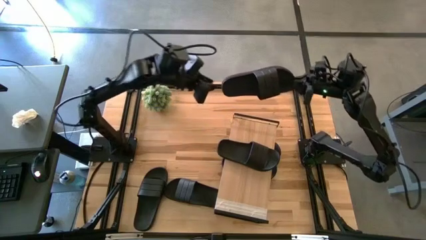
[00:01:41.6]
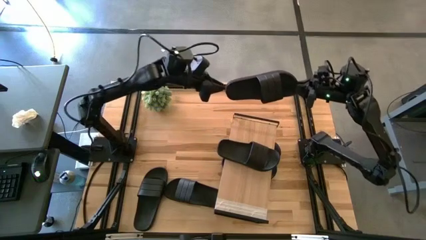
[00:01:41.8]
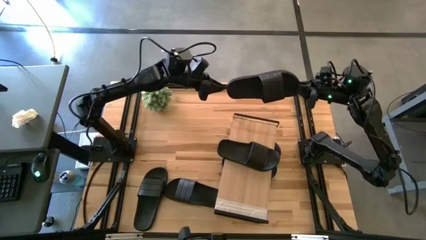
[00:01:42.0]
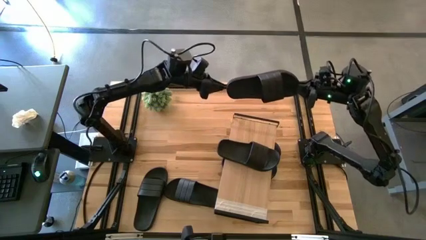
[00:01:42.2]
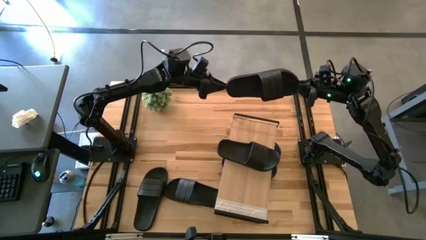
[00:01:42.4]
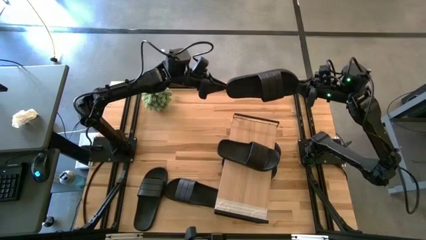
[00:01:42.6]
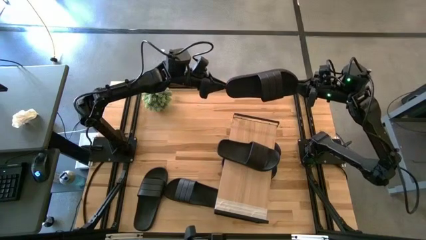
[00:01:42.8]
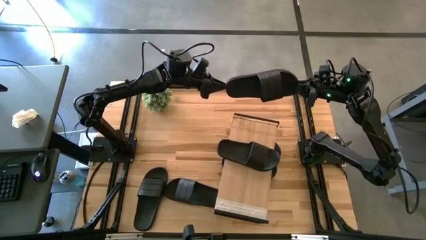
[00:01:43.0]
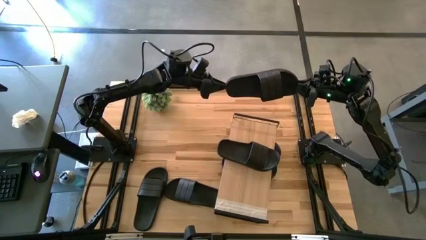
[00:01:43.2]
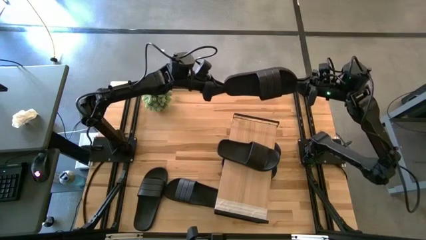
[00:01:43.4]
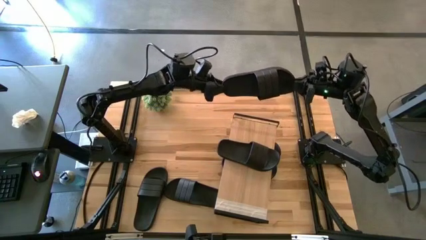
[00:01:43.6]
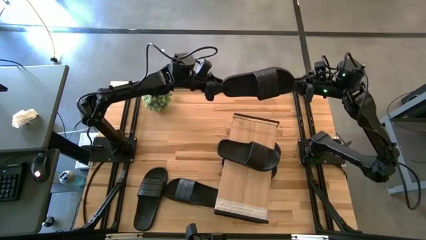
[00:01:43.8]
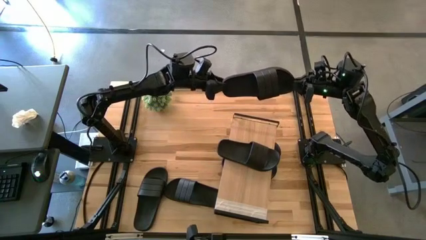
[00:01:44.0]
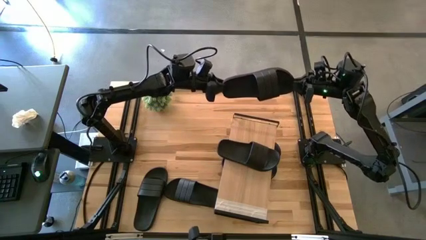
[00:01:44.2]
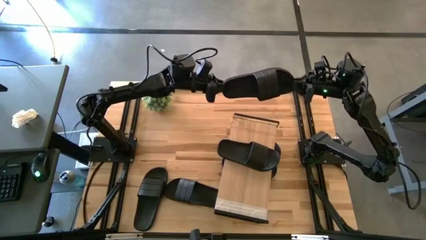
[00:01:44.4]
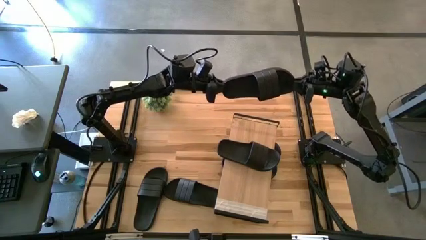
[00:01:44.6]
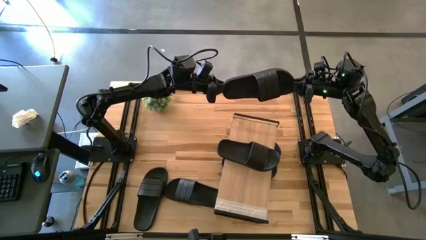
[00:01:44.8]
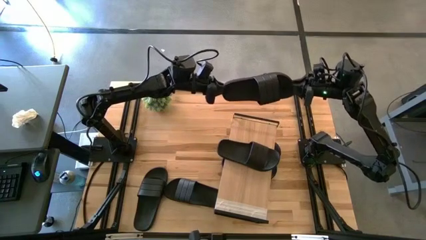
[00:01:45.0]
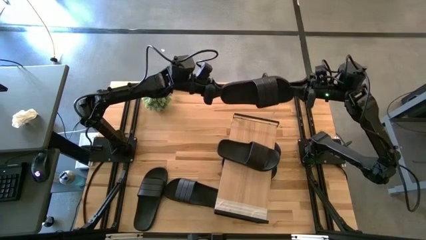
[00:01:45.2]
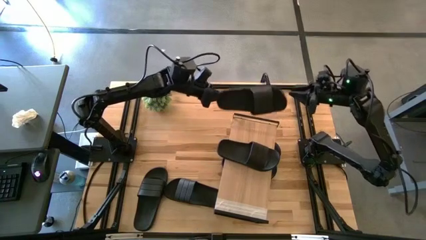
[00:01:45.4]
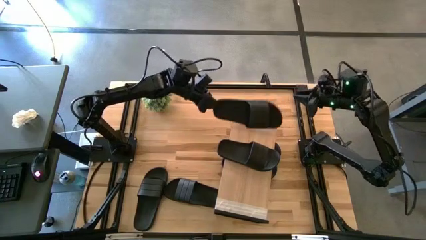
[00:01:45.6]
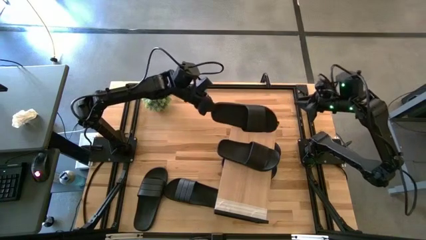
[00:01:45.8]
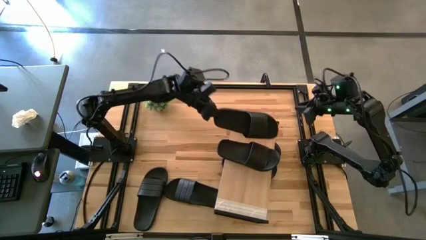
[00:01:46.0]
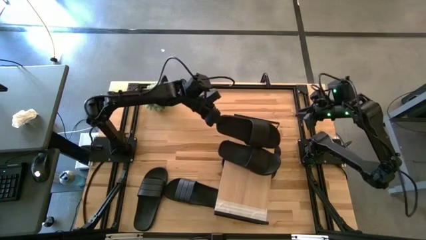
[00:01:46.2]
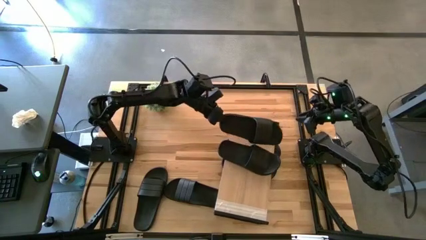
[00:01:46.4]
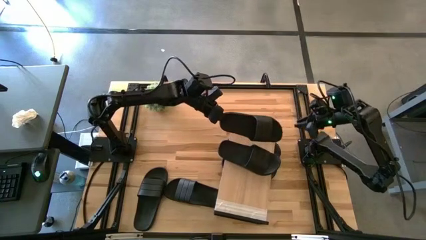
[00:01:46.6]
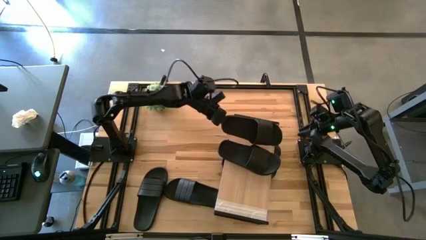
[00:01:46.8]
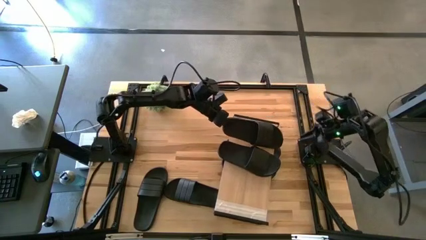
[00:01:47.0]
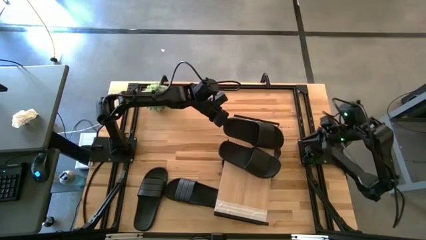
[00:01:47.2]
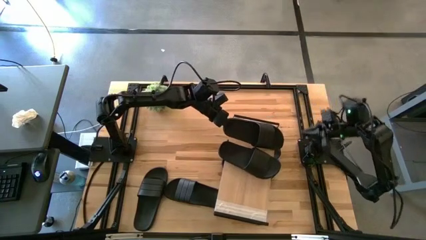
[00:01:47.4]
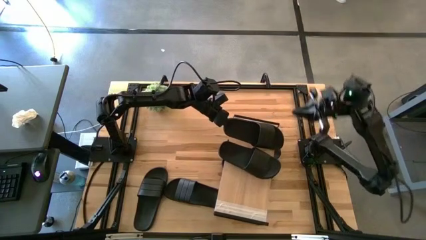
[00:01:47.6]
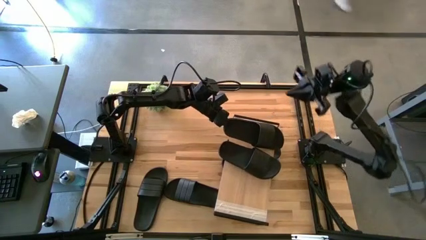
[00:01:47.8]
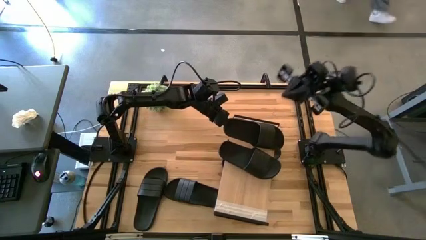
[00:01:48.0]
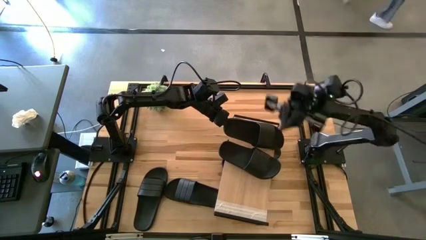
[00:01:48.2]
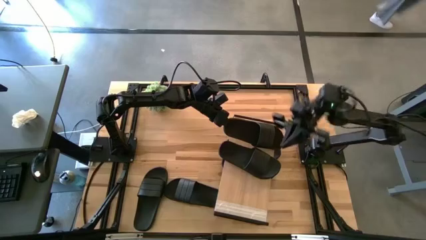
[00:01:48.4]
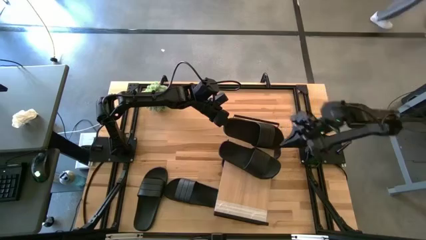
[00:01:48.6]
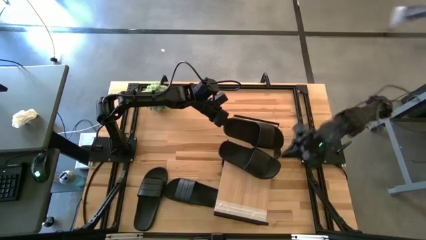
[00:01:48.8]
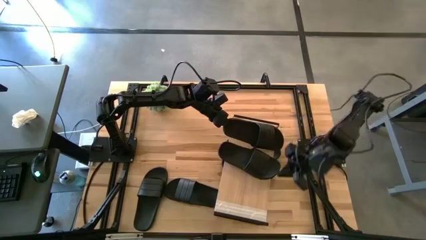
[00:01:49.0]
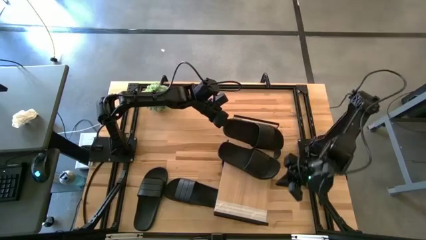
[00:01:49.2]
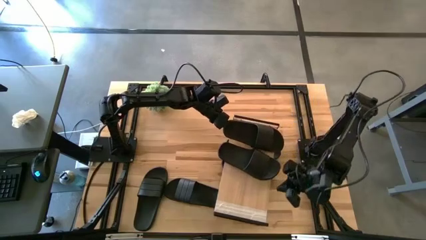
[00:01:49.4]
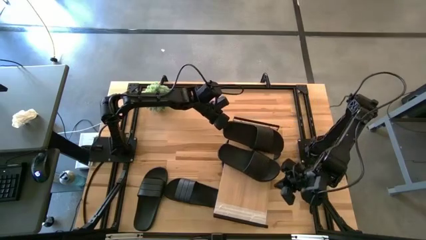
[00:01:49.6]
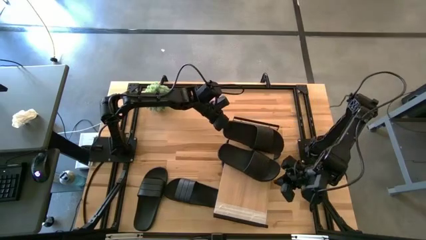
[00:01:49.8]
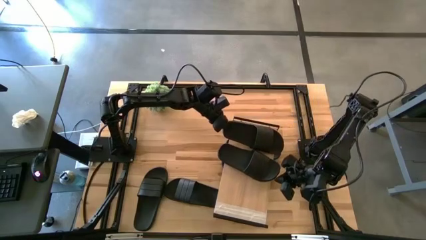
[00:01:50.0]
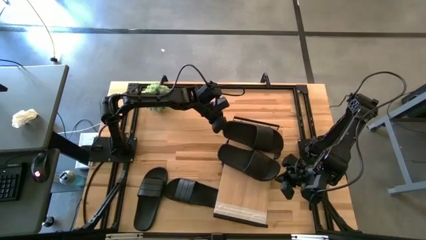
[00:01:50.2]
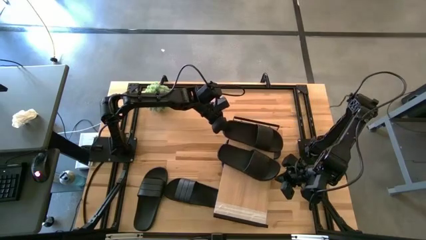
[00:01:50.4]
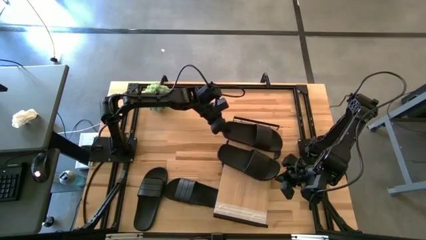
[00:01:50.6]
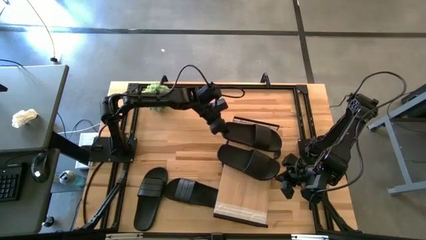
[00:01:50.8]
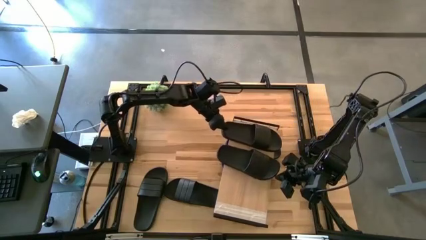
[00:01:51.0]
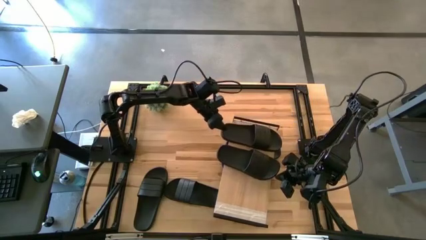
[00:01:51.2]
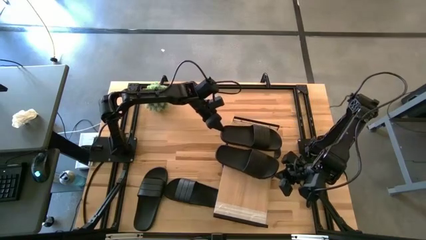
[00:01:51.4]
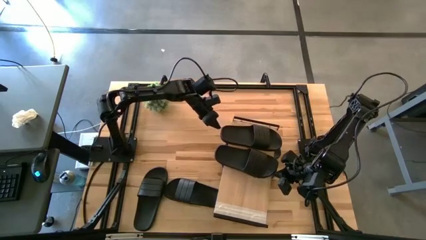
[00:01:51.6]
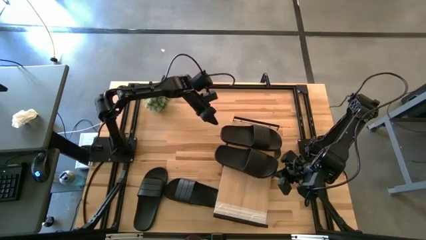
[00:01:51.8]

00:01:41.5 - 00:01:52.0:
Task: Pick and place slides into the shelf
Put the top black slide on the shelf

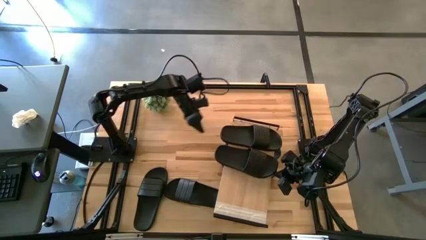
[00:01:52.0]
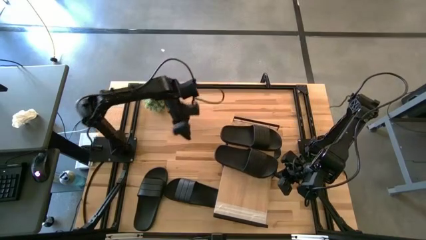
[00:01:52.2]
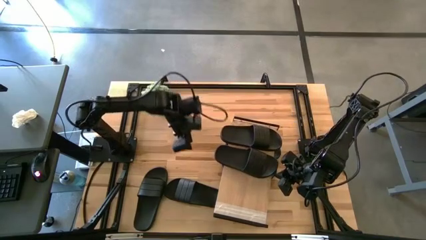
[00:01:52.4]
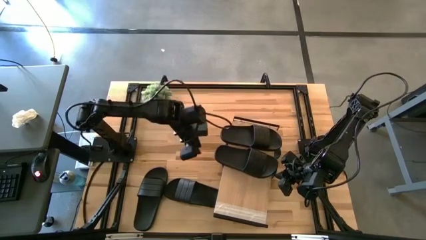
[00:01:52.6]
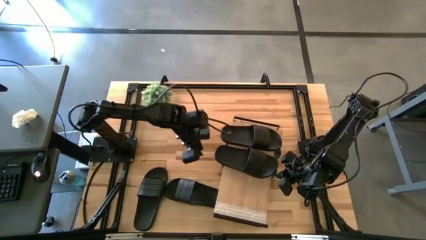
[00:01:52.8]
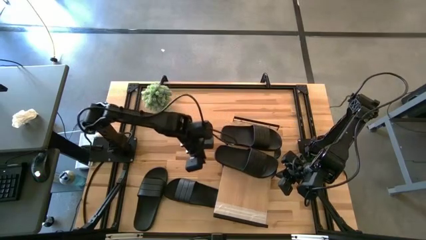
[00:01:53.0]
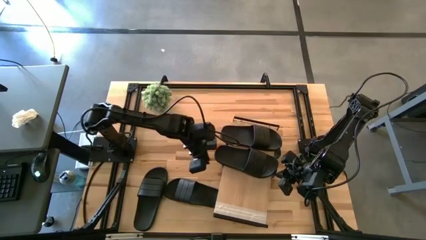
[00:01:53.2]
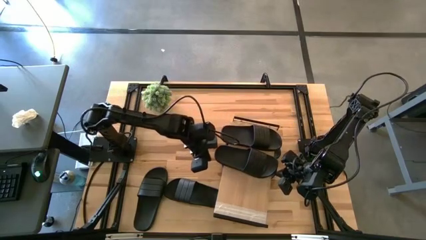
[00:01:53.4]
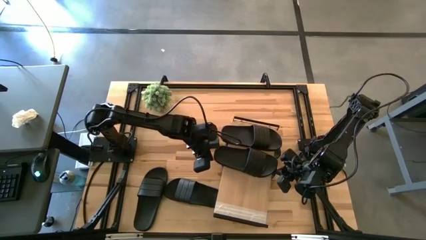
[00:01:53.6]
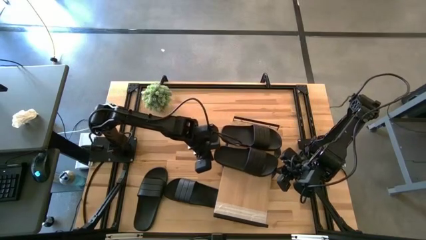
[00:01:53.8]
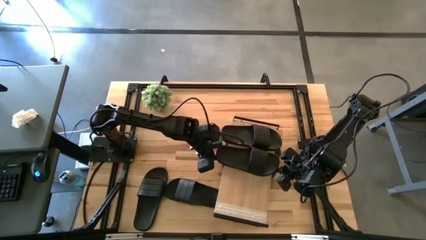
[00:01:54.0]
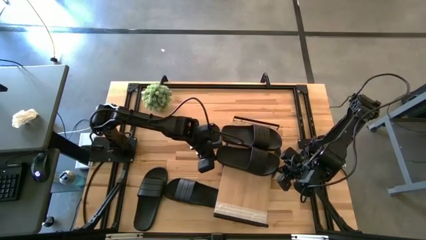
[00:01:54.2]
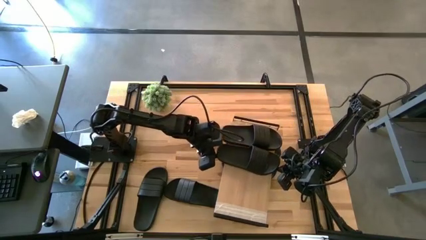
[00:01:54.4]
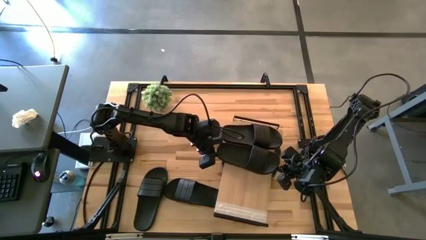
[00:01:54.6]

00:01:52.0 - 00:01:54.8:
Adjust the black slide on the shelf

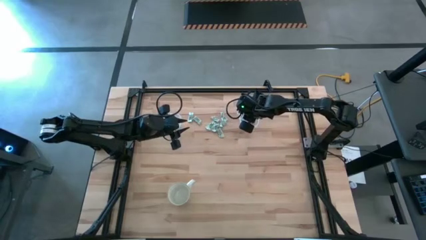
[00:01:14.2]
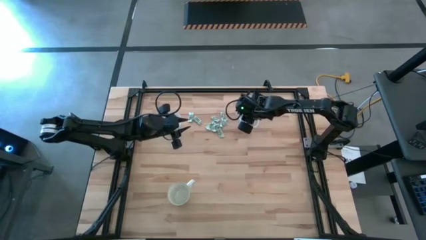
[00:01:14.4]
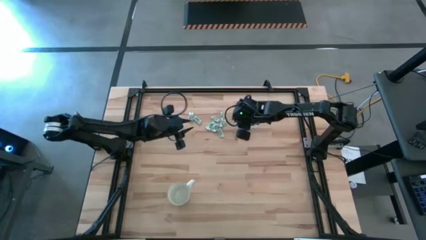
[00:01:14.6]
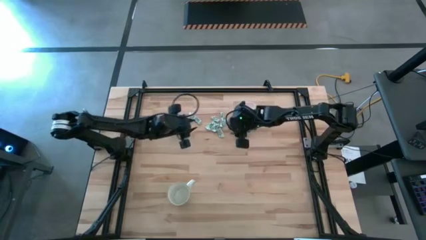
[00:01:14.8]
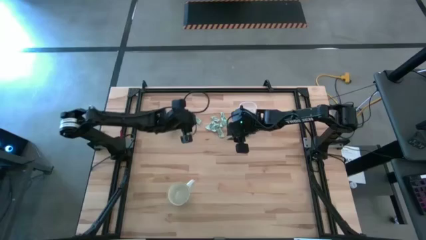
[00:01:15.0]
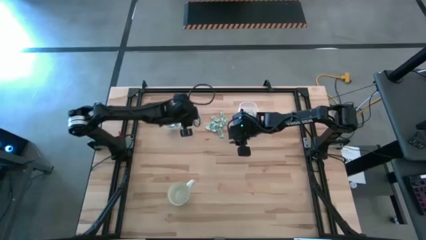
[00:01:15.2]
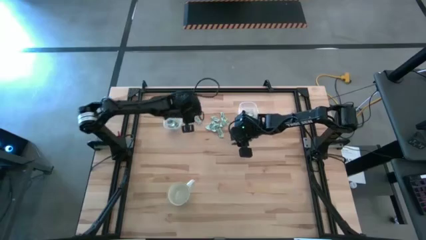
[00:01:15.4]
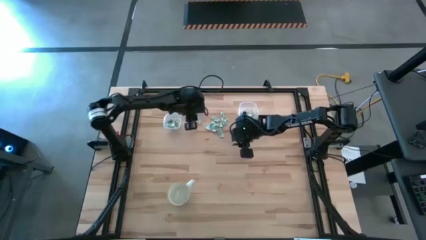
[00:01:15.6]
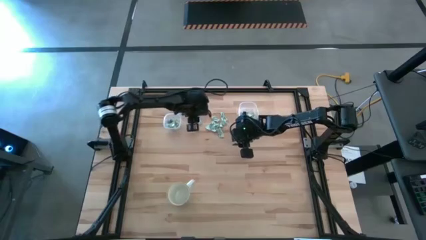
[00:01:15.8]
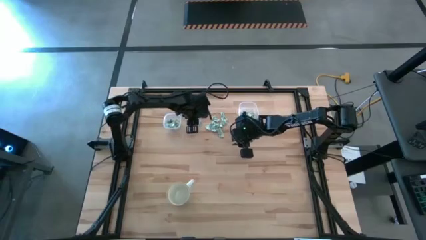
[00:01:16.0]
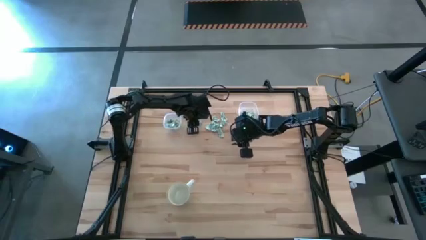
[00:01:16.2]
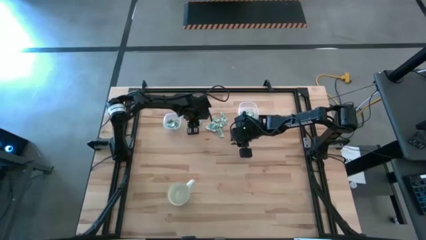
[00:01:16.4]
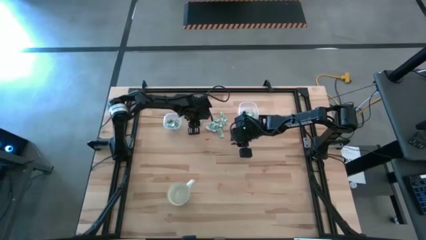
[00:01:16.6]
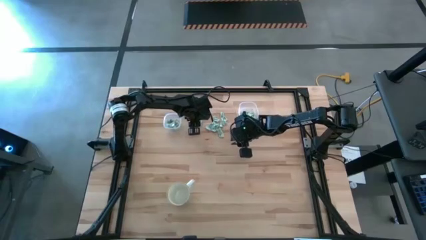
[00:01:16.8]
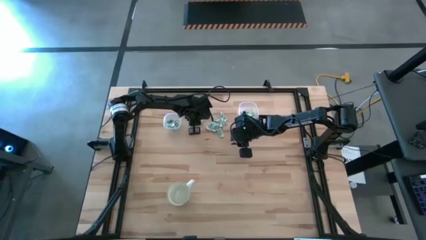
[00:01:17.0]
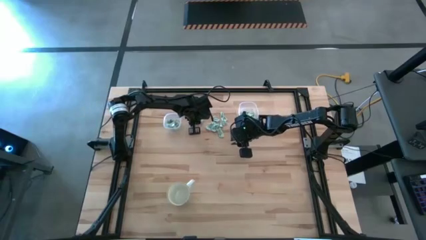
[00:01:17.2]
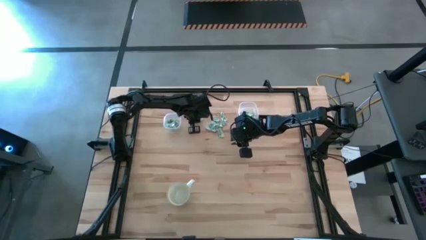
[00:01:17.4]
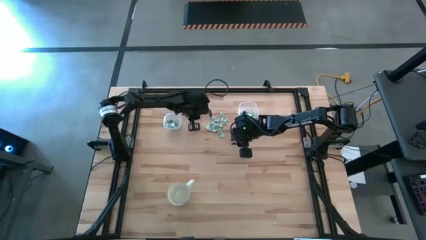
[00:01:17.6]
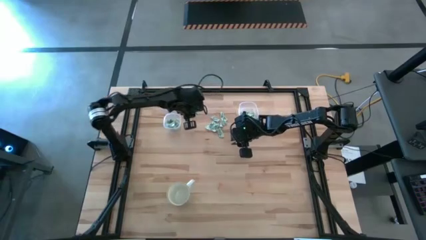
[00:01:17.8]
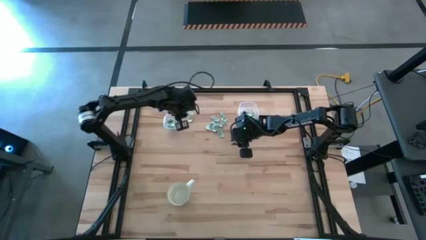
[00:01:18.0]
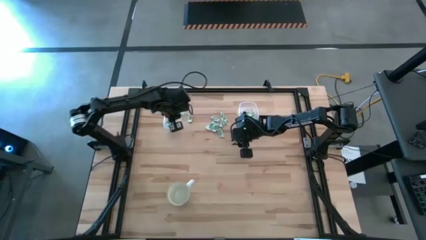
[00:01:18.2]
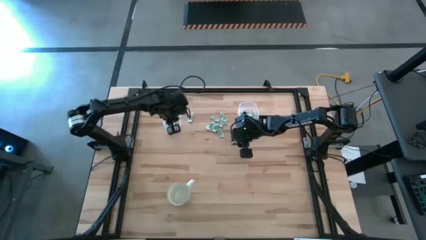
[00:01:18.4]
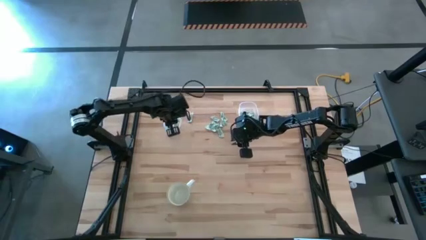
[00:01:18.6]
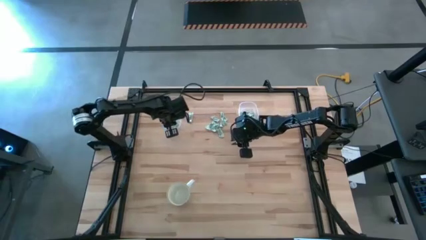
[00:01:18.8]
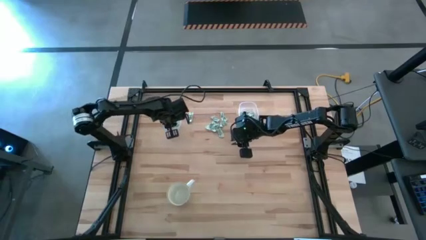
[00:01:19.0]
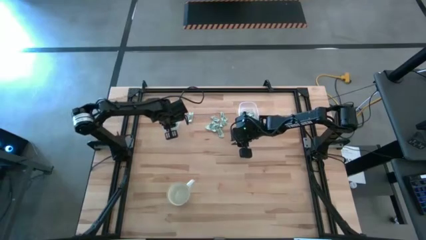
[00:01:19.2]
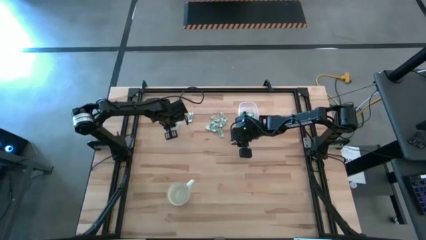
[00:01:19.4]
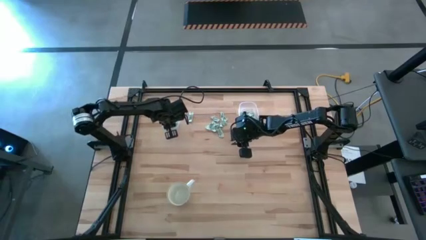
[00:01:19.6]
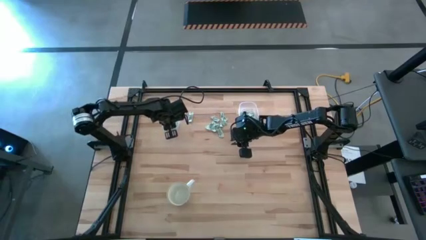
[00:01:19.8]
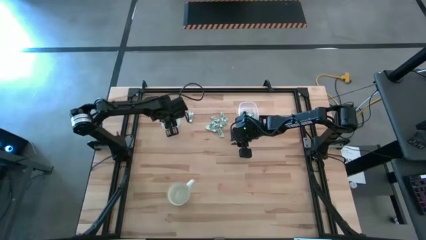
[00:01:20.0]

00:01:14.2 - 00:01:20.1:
Task: Pick and place items into bin
Put the green stevia packet into the square transparent bin
